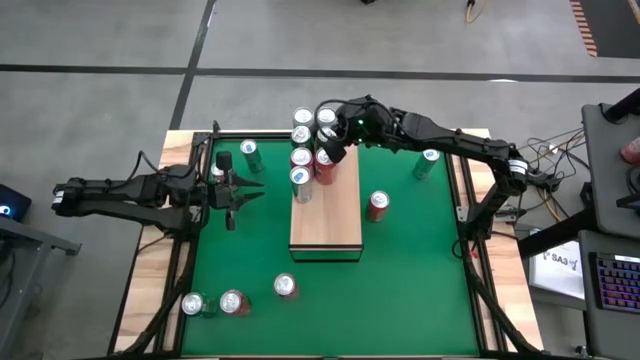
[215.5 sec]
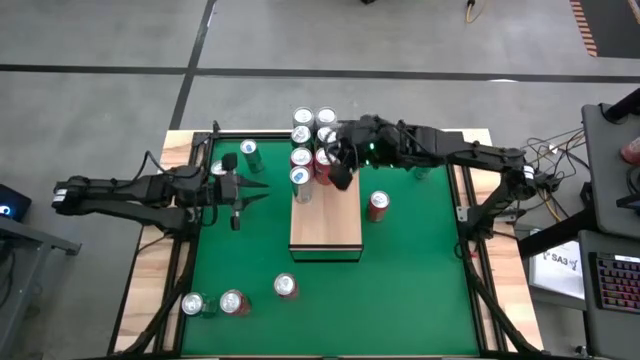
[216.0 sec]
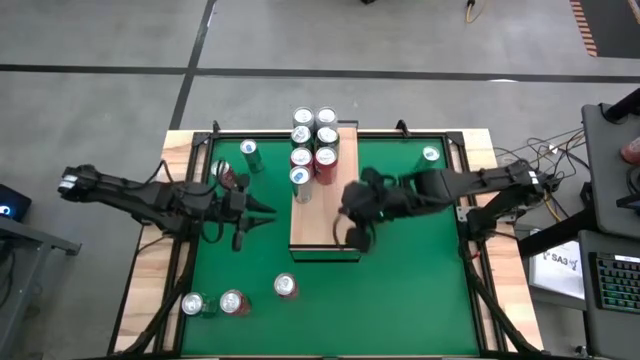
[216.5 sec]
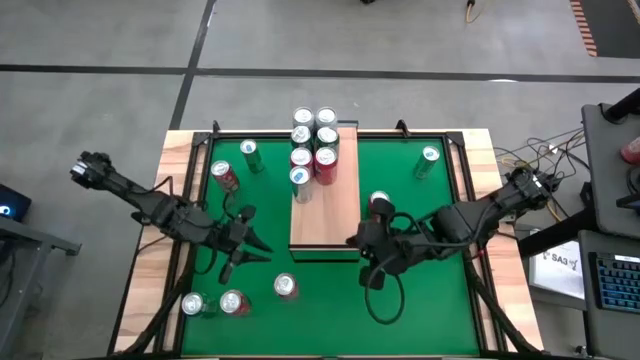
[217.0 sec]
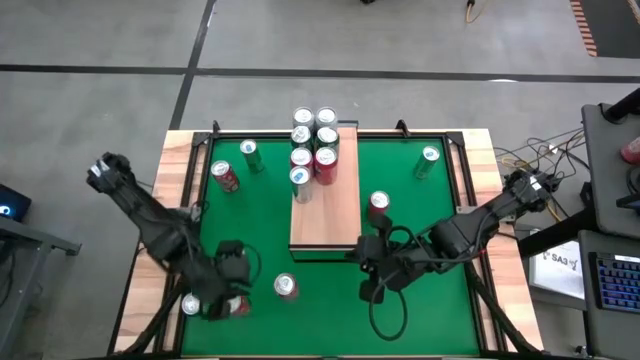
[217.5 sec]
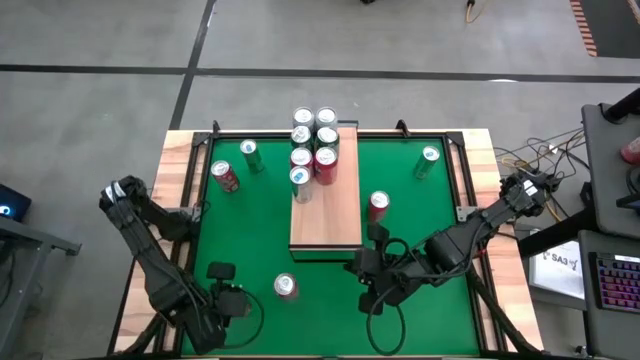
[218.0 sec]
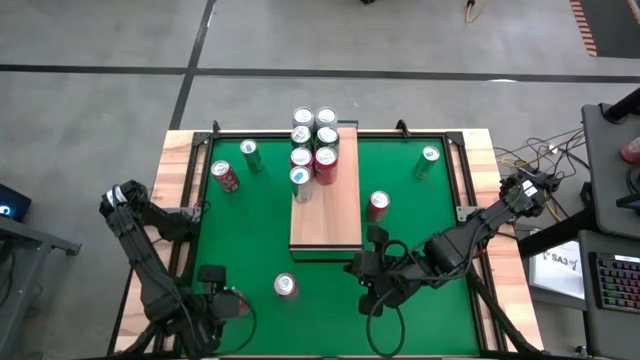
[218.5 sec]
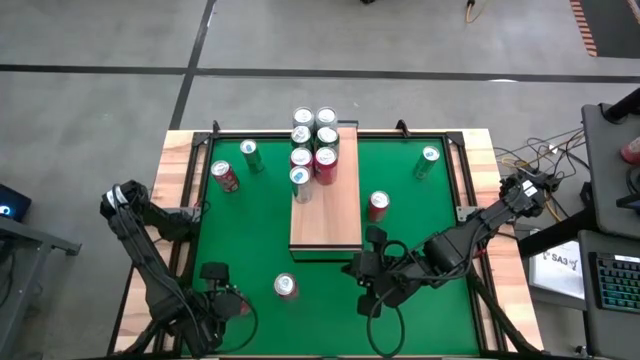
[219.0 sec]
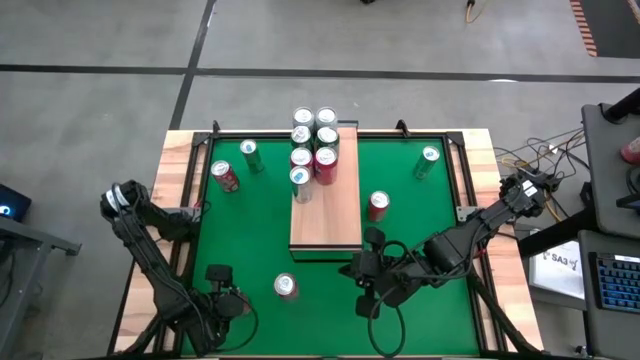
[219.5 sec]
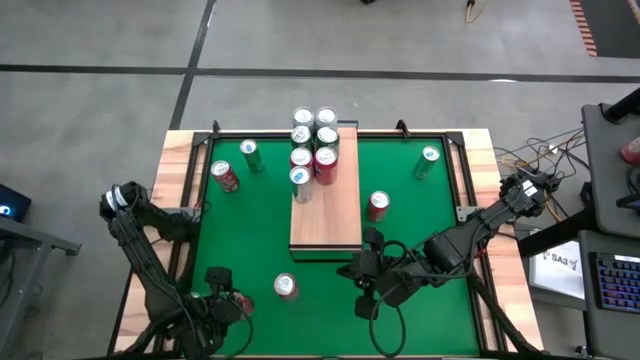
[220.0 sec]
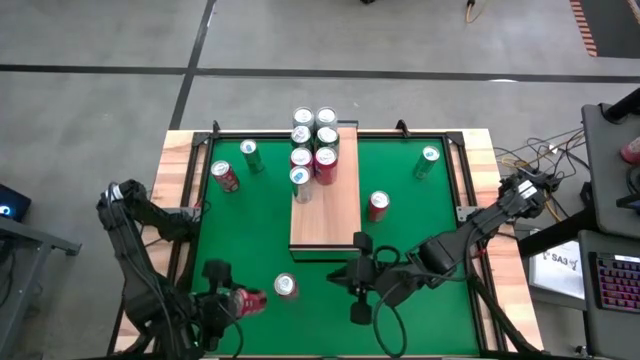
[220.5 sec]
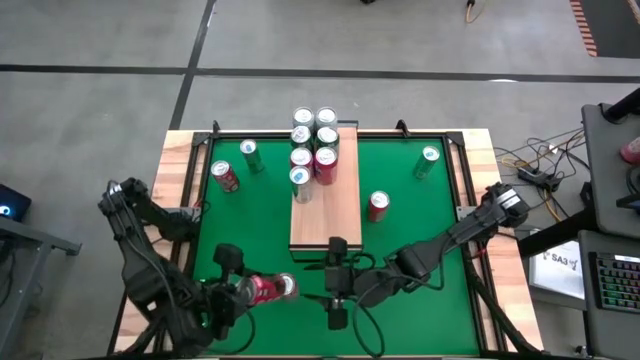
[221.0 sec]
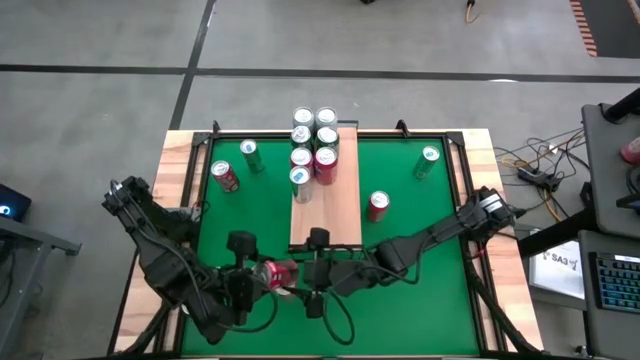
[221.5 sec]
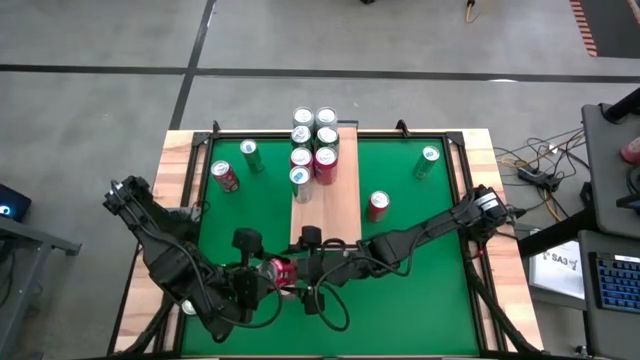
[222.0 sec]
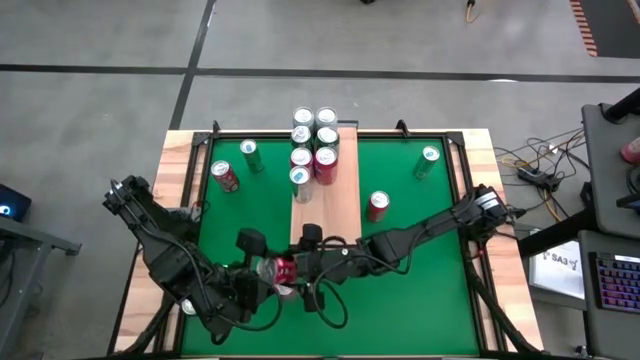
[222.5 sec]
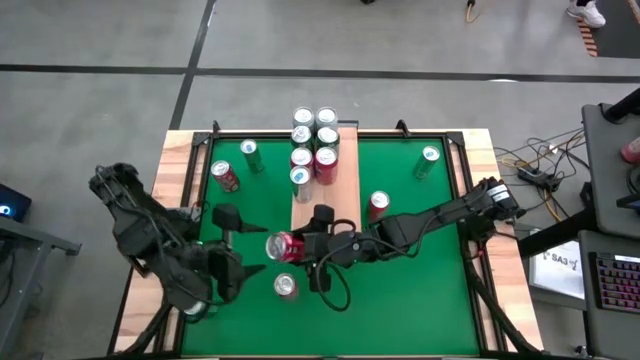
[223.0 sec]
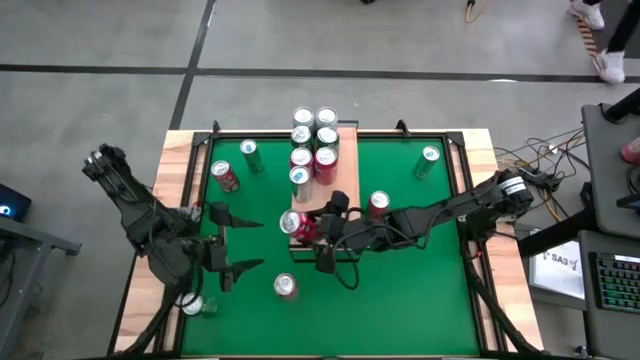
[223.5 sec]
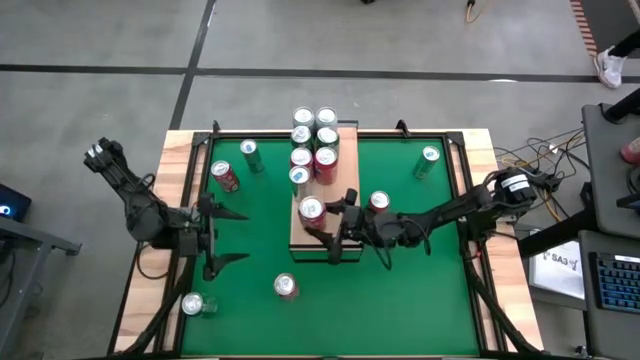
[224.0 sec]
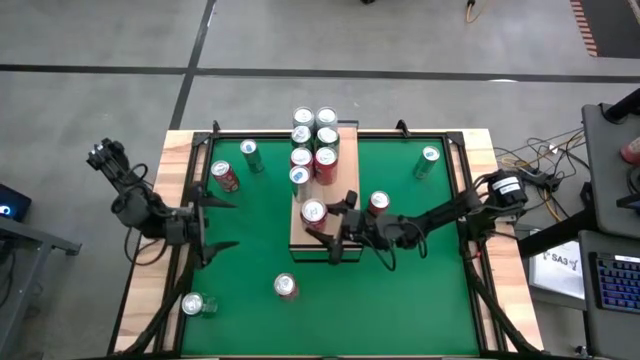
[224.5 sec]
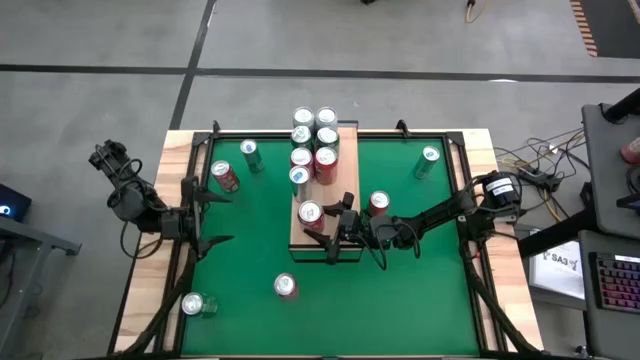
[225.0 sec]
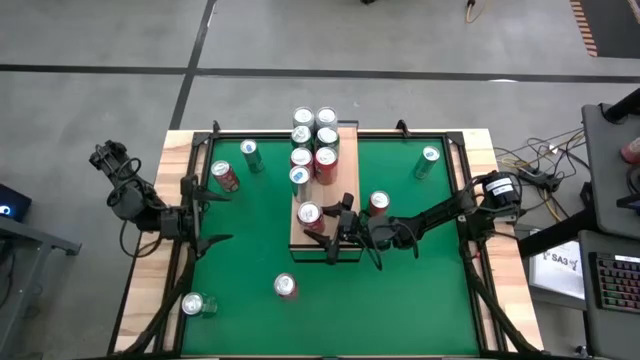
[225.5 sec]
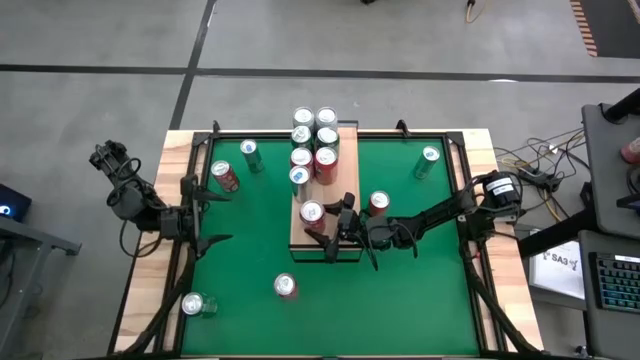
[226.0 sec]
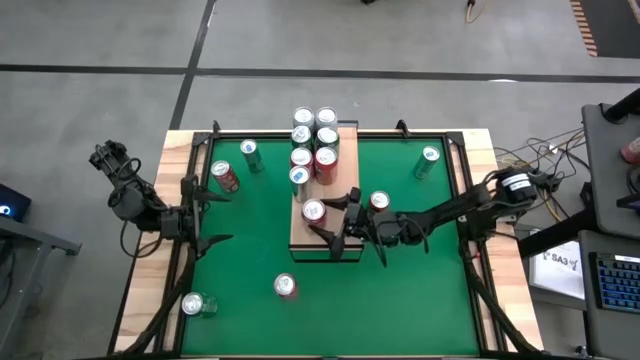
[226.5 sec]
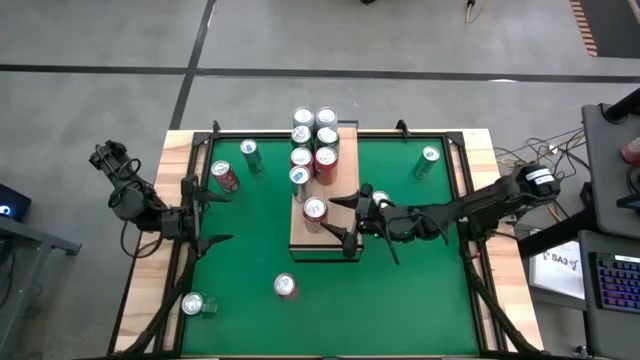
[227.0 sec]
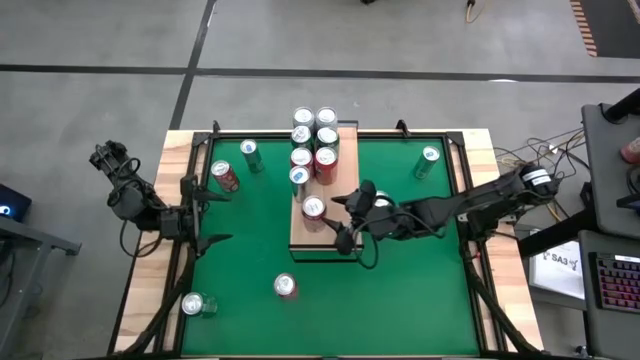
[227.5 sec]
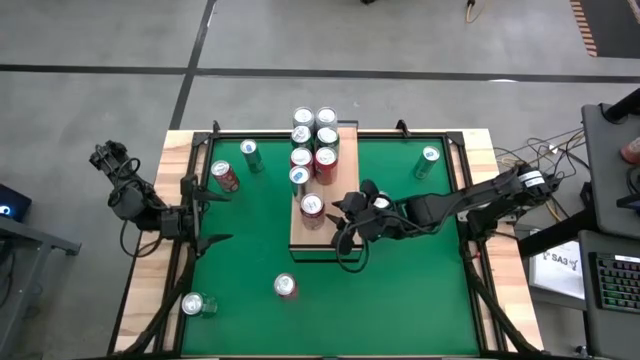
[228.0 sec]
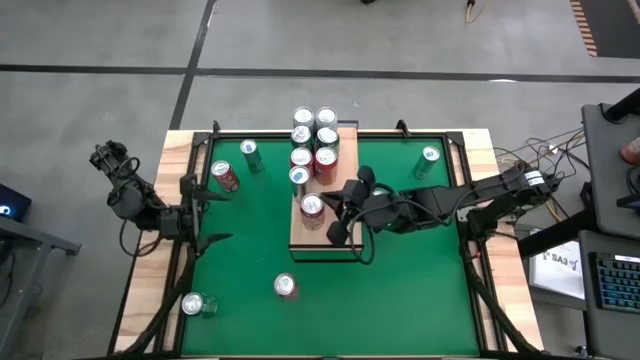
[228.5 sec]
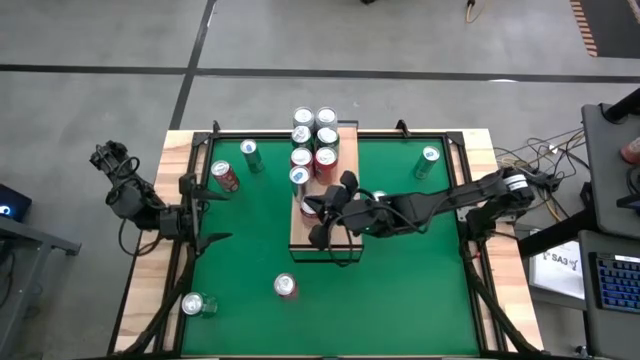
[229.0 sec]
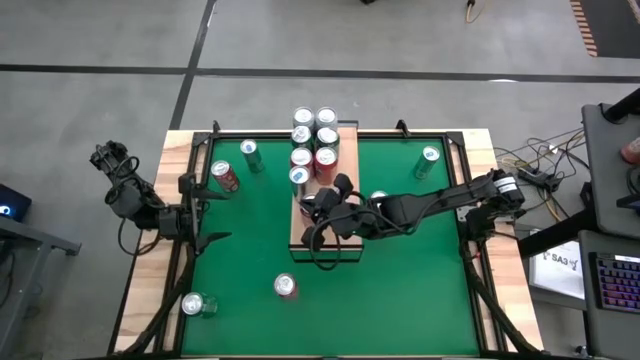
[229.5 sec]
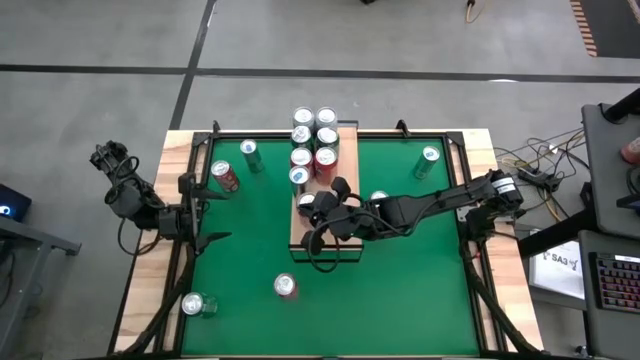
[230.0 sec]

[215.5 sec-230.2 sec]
Task: Place canned beverage on shelf
Put the red can on the shelf

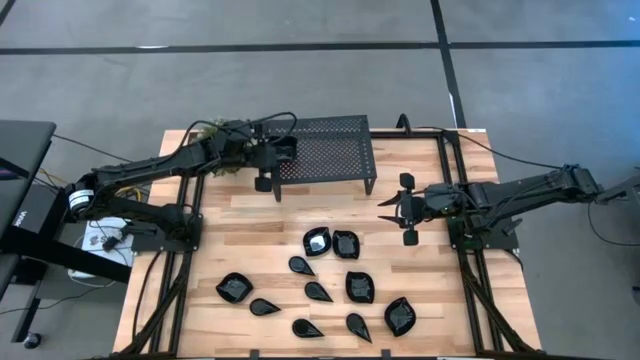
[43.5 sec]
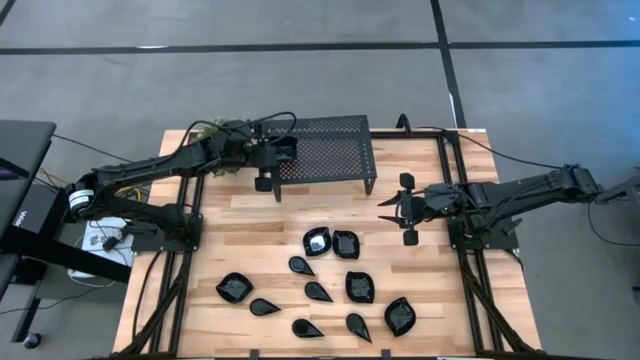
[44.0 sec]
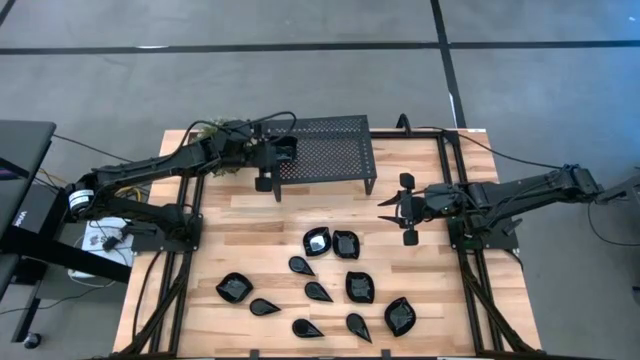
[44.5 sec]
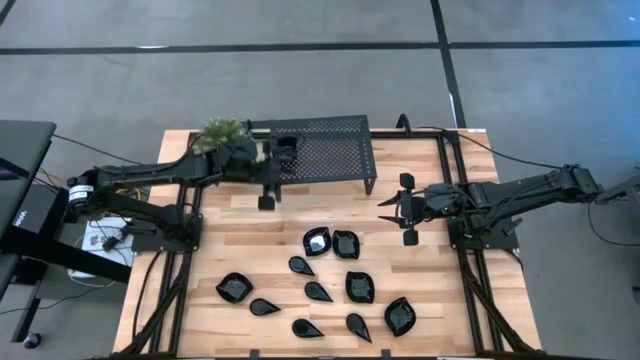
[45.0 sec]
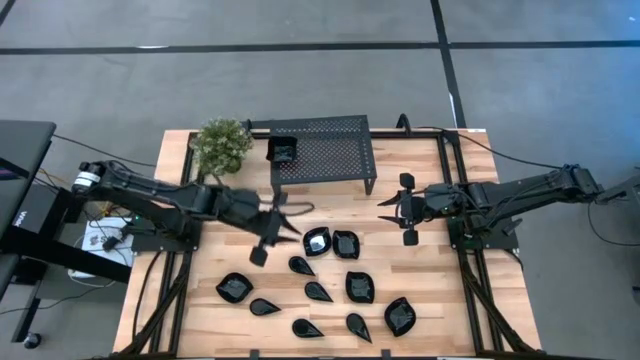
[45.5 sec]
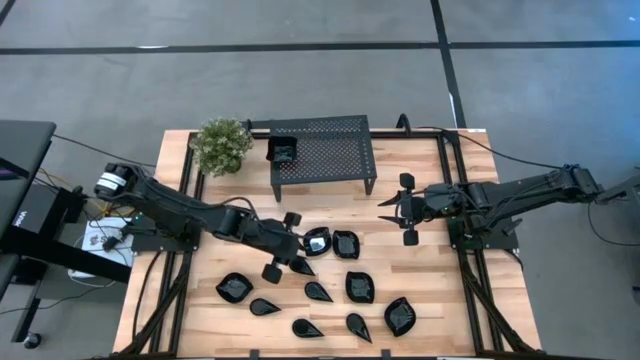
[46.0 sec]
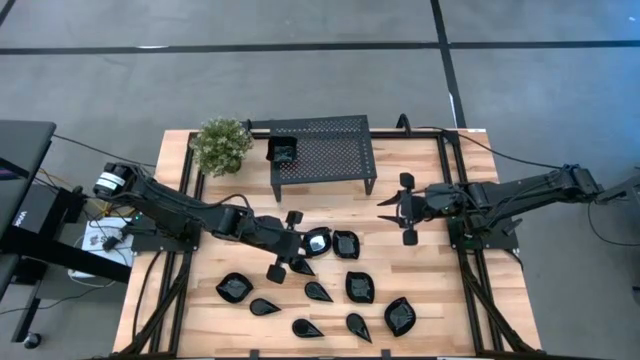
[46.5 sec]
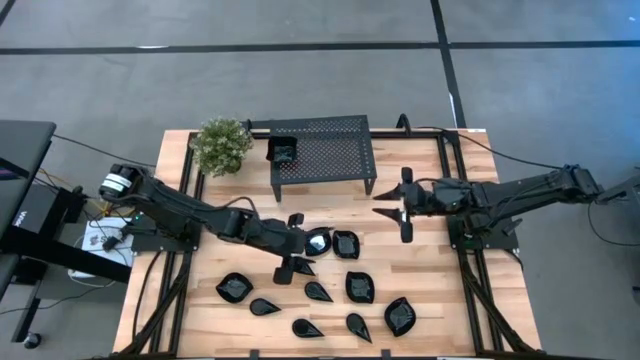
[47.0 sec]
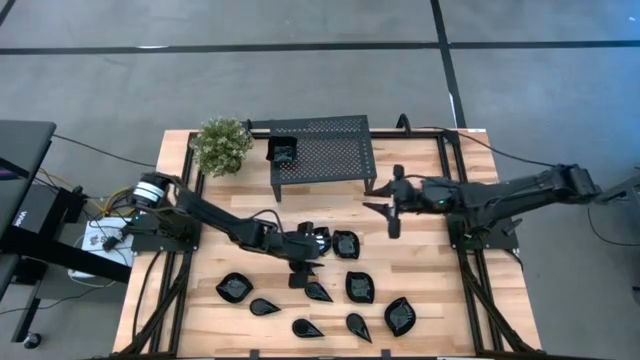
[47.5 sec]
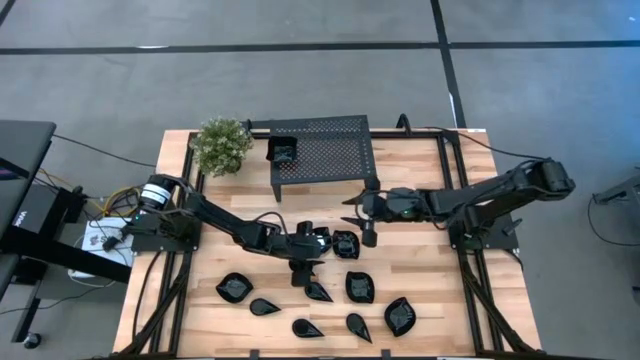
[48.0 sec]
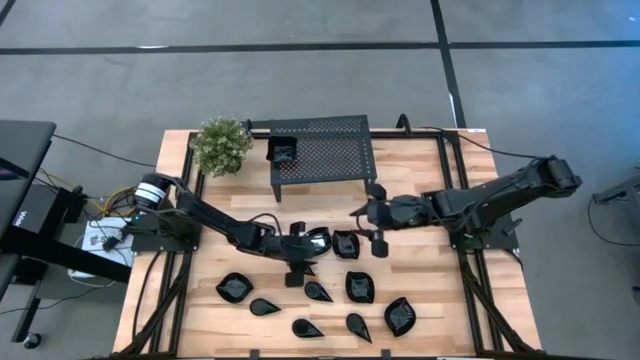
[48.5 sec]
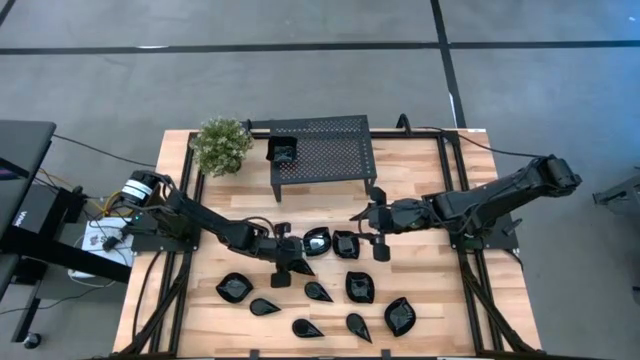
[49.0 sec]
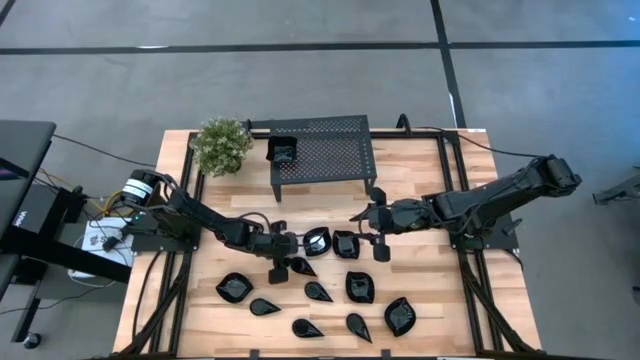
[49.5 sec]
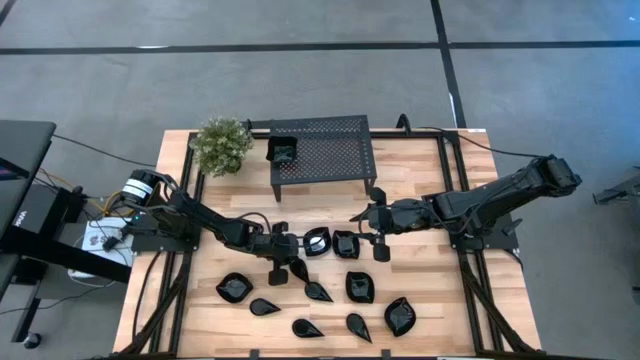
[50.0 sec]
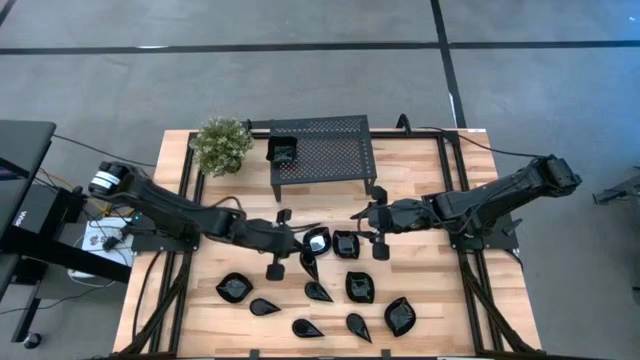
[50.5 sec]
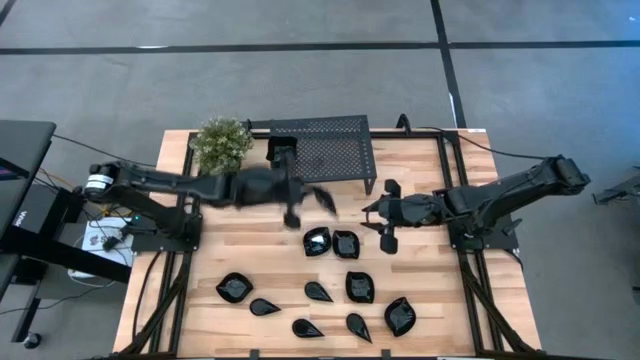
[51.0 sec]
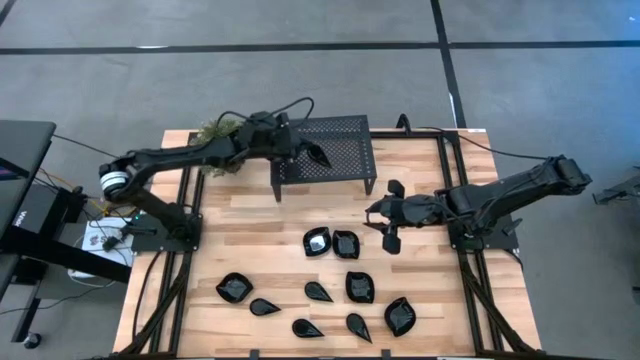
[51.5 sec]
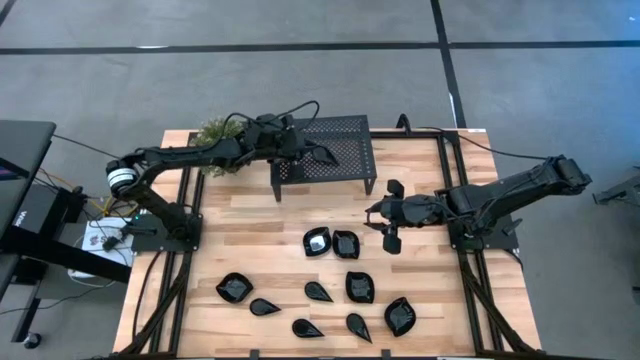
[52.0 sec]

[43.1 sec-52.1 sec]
Task: Pick & Place Mini shaped plates
Put the drop shaped plate on the shelf
